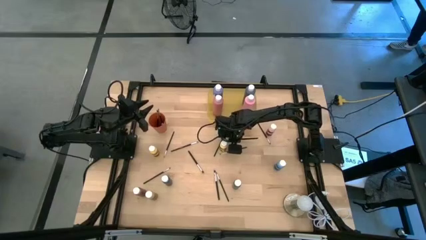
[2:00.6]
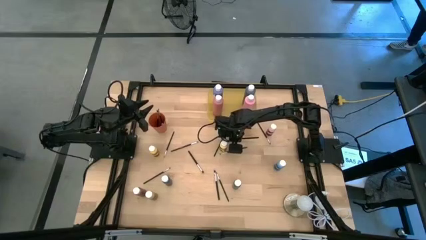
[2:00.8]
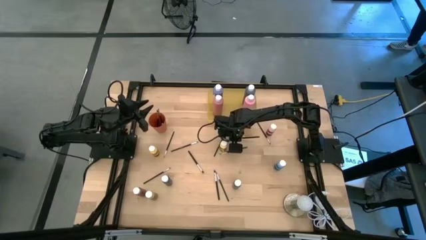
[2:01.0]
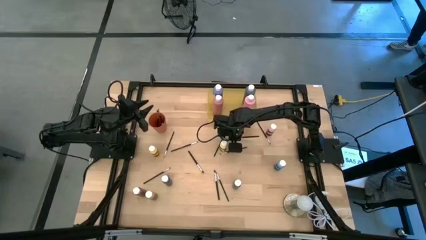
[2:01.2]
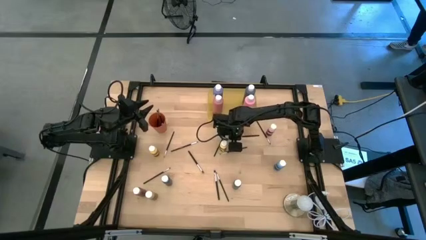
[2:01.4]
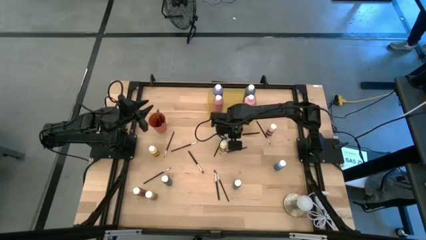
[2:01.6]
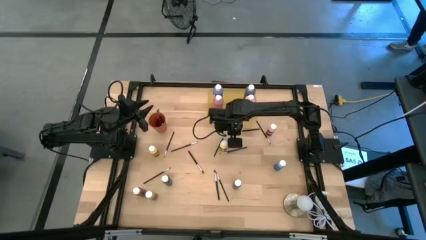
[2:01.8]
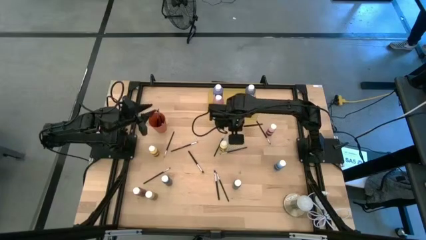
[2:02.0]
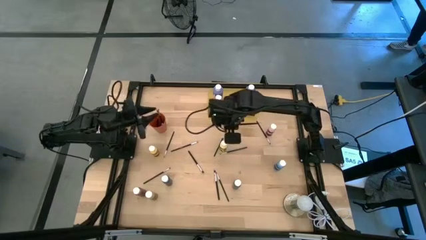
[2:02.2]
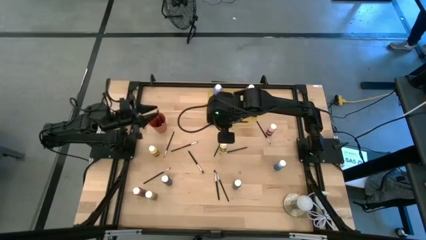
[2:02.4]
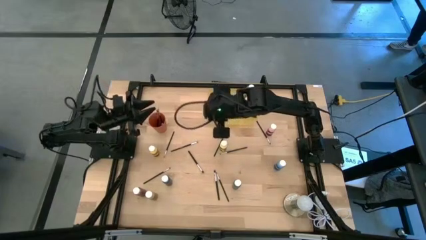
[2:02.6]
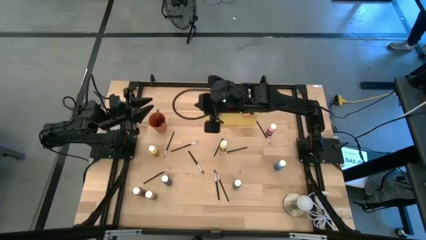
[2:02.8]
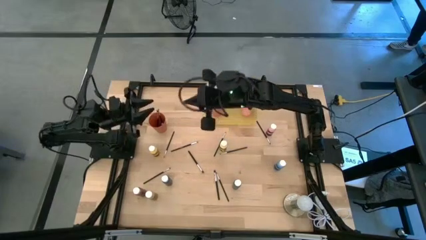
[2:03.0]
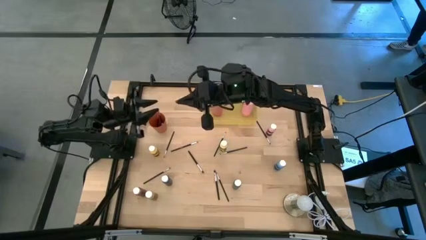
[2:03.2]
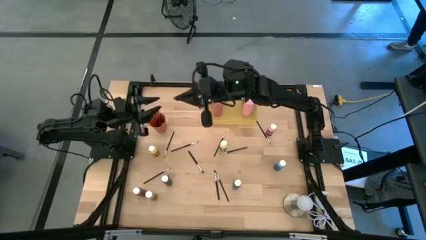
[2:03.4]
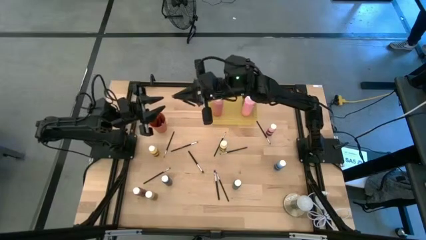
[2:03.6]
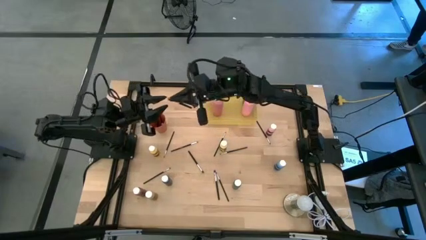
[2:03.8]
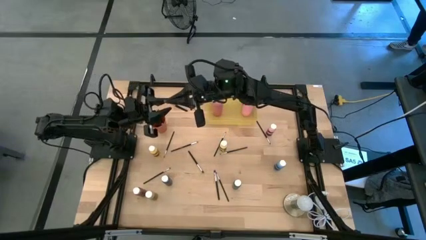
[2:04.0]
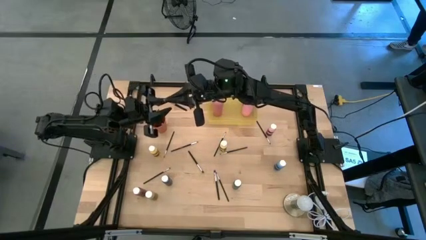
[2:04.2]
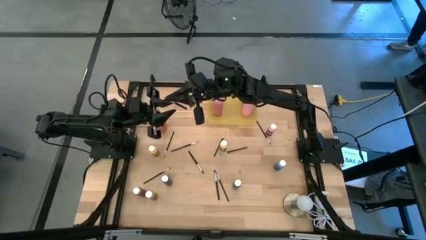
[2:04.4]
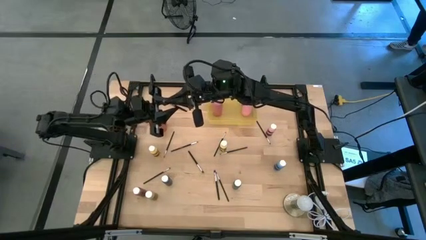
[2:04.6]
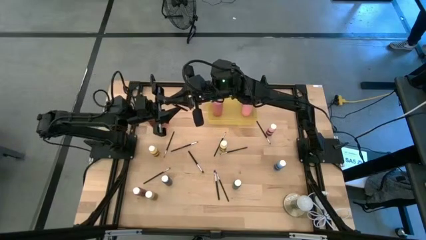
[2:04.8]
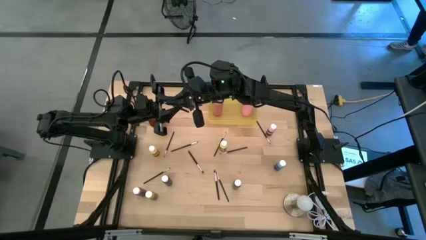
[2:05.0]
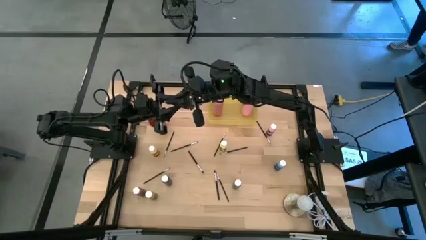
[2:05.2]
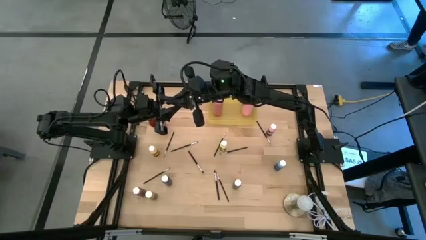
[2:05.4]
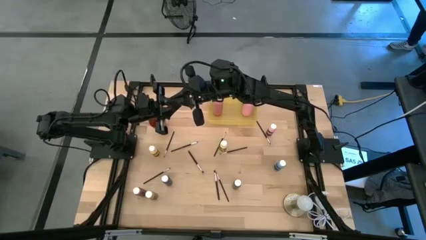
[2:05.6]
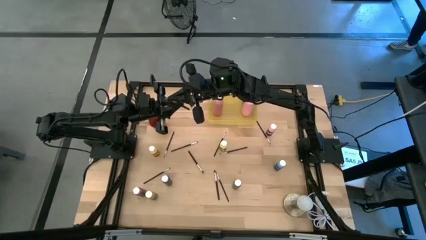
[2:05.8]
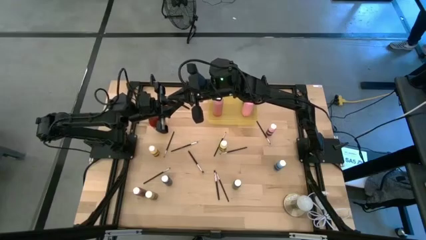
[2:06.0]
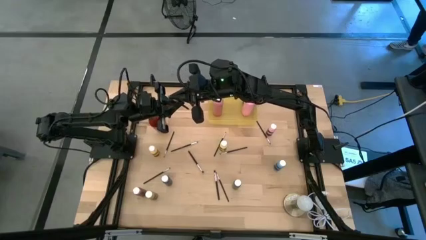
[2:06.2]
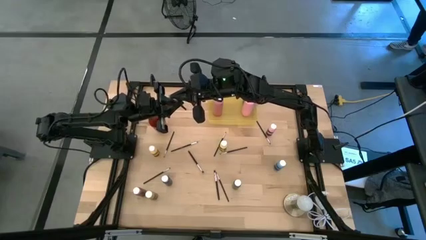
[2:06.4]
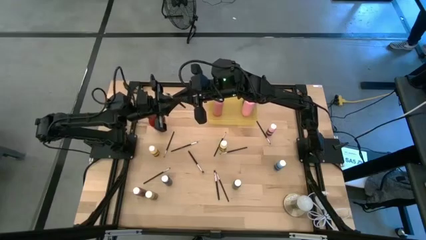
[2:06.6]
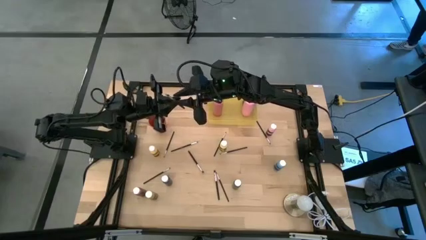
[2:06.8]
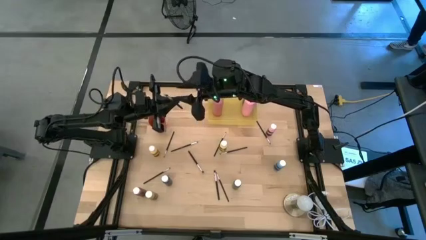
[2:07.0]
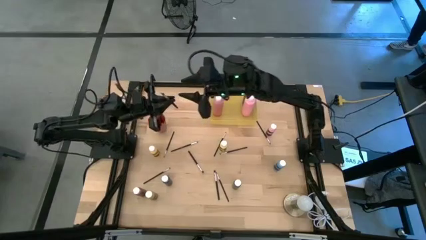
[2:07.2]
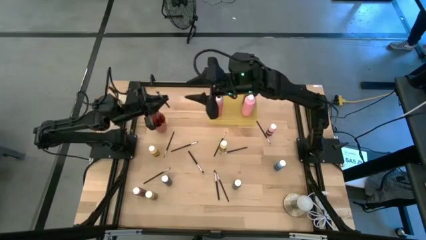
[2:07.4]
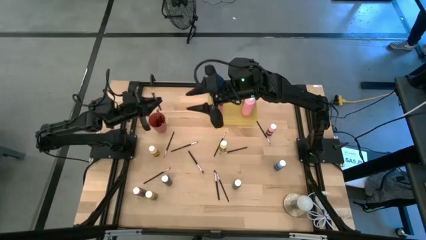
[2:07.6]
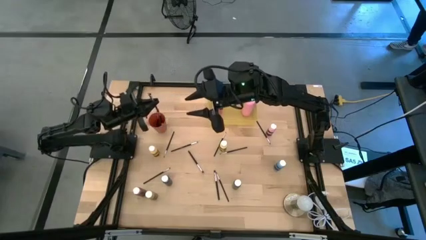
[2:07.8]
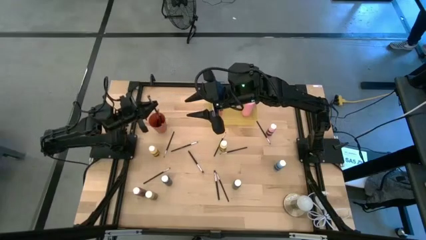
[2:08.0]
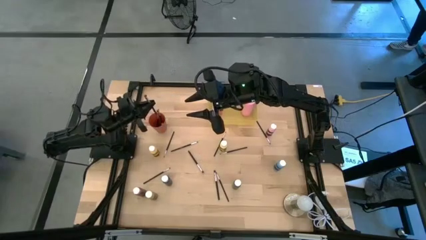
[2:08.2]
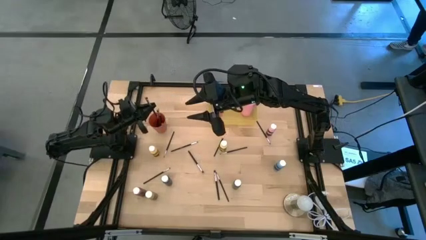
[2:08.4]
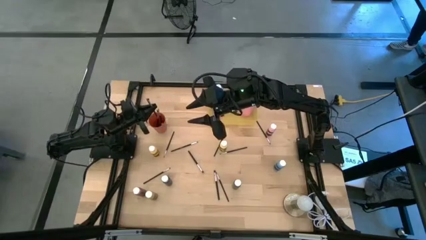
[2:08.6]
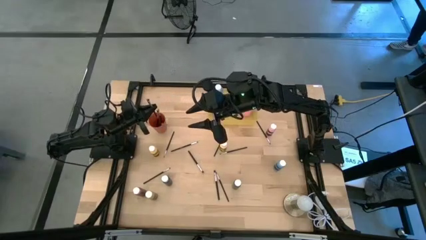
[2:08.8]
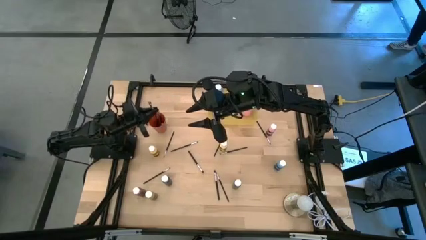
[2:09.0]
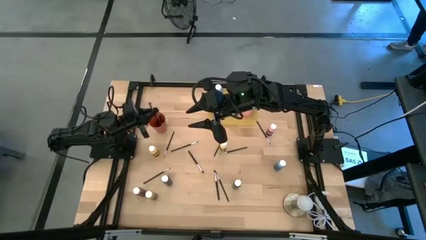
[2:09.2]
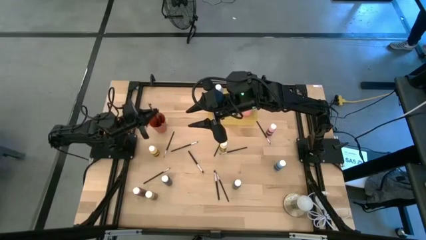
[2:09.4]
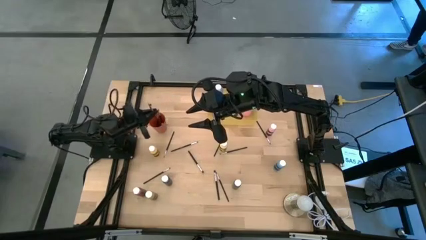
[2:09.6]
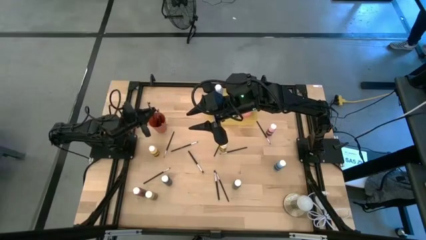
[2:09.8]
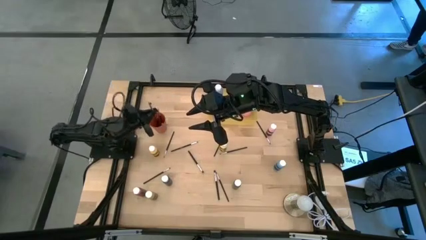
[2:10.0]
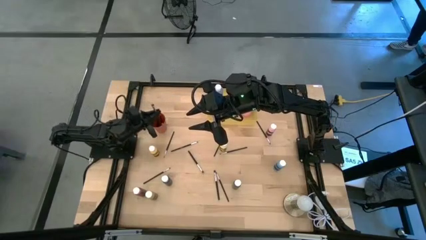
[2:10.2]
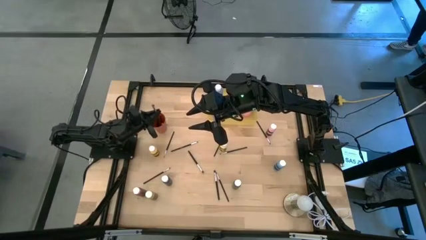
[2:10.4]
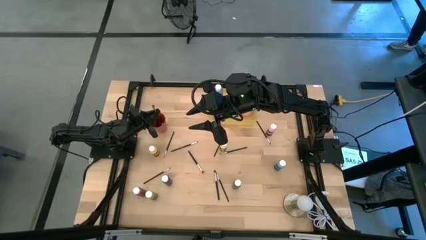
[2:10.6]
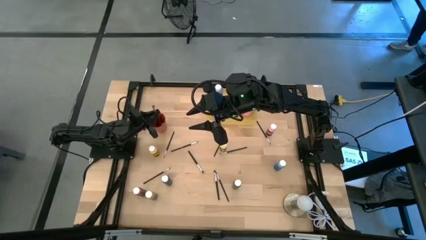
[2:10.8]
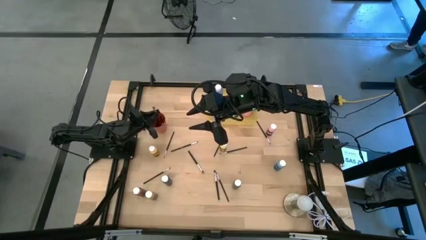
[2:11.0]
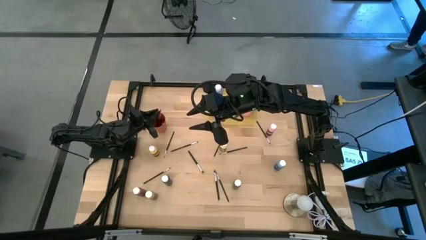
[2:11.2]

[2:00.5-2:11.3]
Task: Pick & Place Paint Supplies
Put the silver paint brush into the orange cup

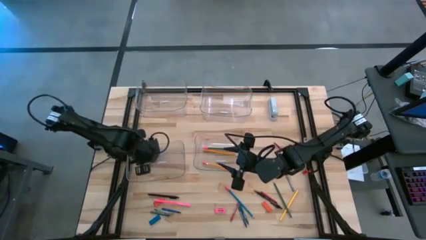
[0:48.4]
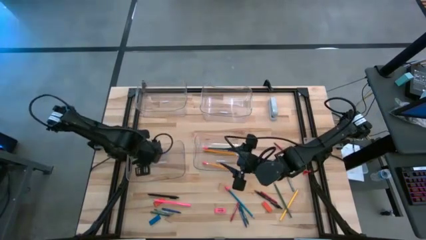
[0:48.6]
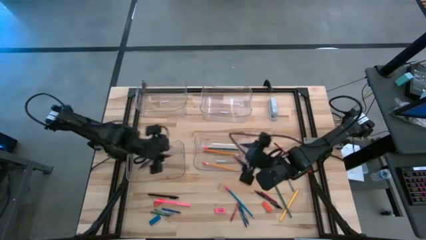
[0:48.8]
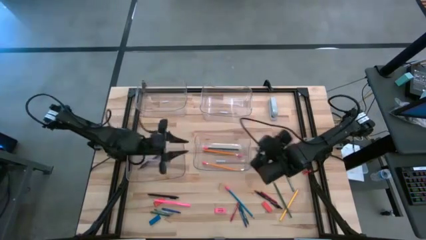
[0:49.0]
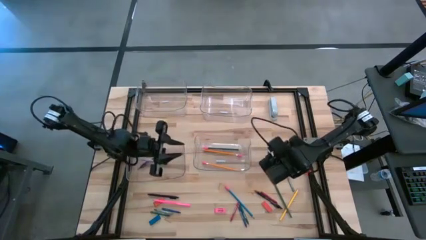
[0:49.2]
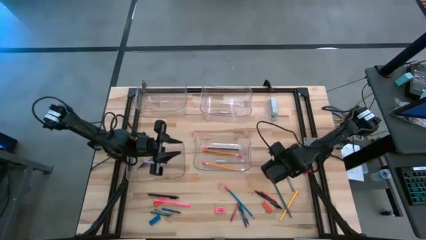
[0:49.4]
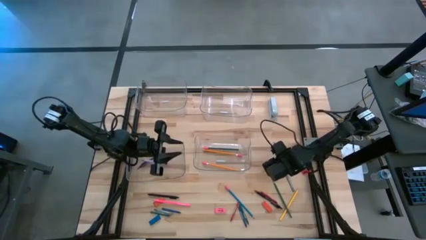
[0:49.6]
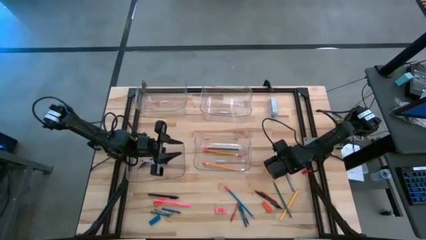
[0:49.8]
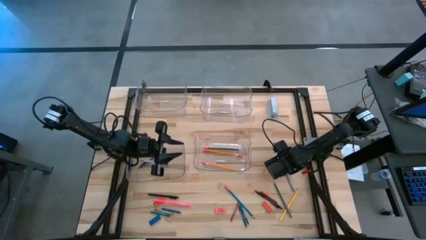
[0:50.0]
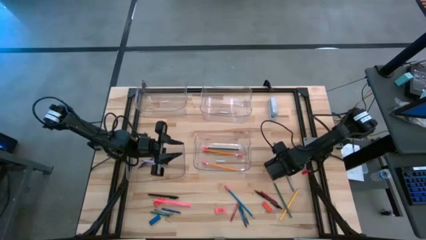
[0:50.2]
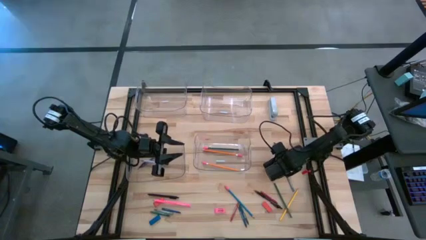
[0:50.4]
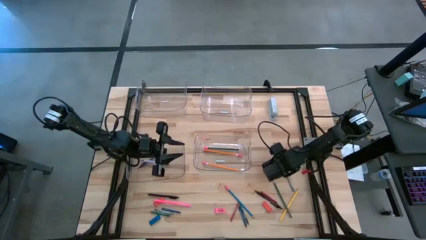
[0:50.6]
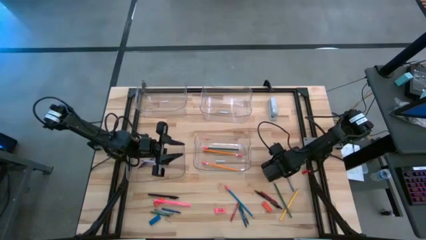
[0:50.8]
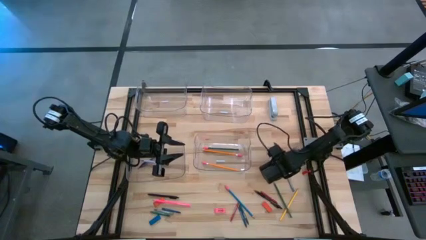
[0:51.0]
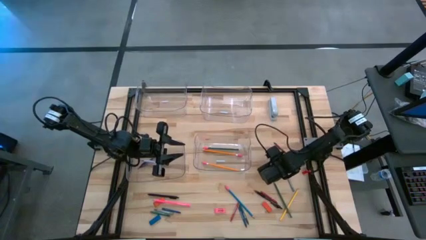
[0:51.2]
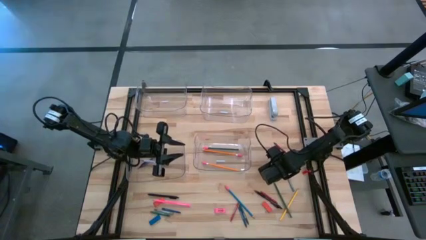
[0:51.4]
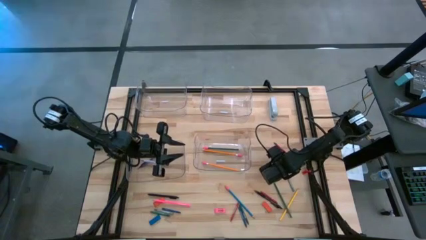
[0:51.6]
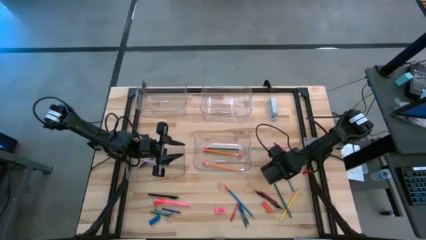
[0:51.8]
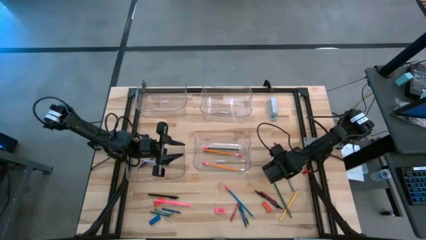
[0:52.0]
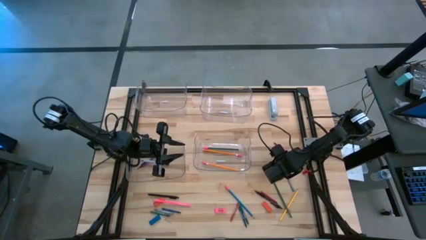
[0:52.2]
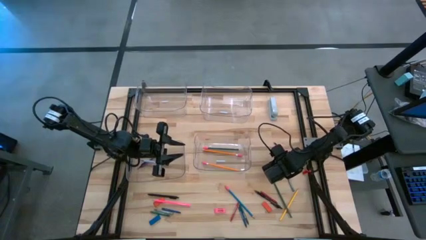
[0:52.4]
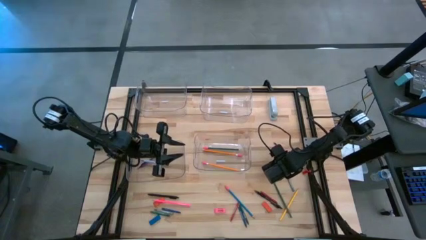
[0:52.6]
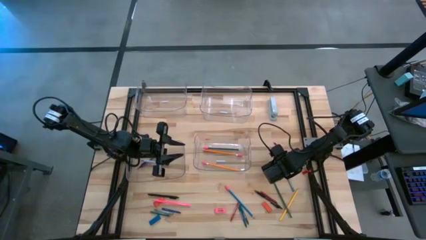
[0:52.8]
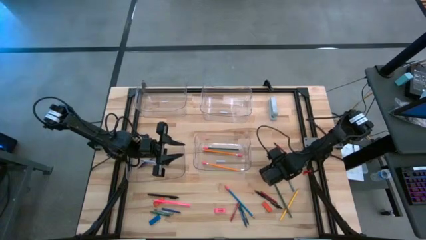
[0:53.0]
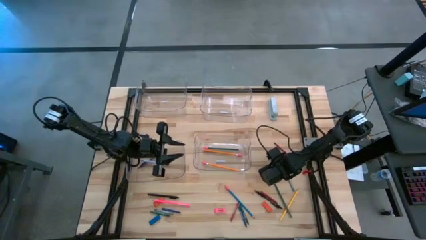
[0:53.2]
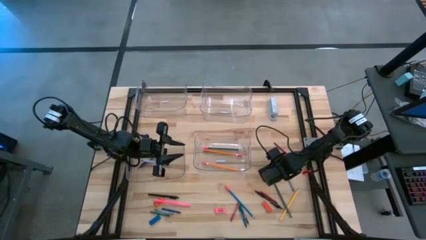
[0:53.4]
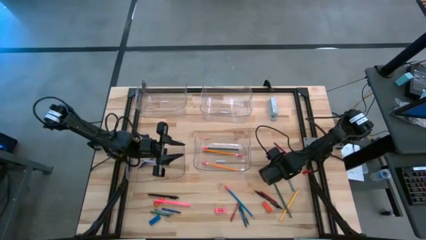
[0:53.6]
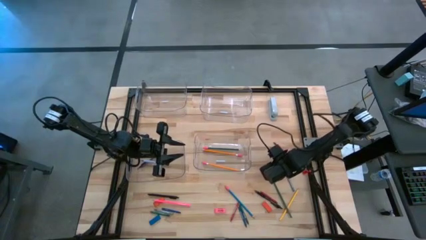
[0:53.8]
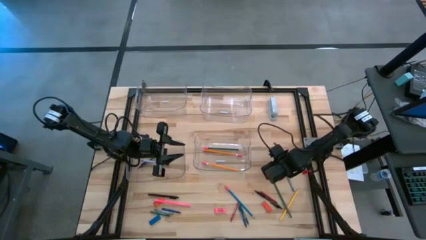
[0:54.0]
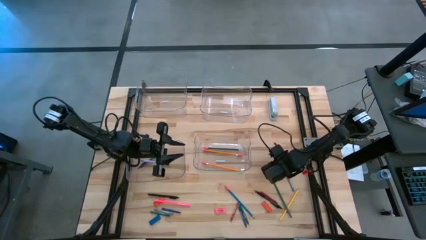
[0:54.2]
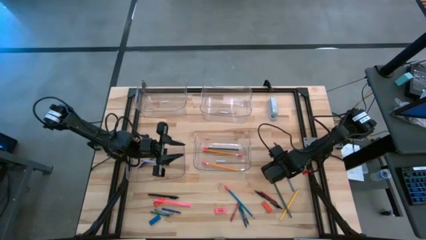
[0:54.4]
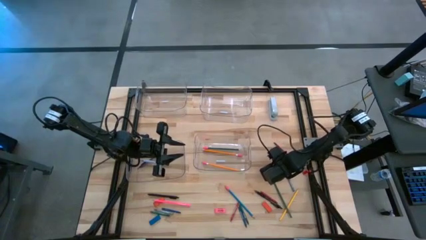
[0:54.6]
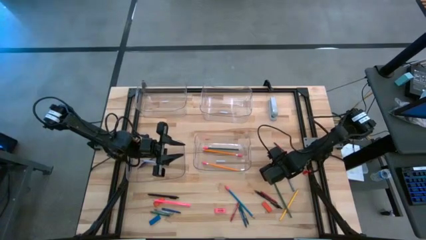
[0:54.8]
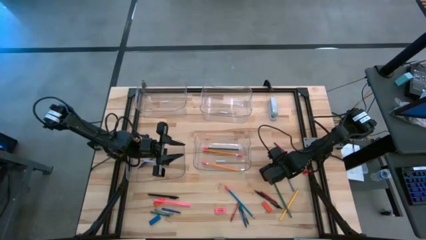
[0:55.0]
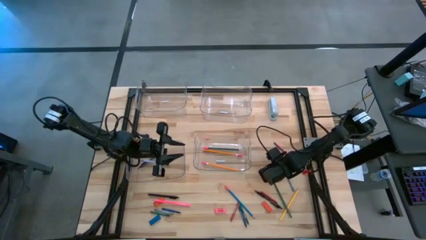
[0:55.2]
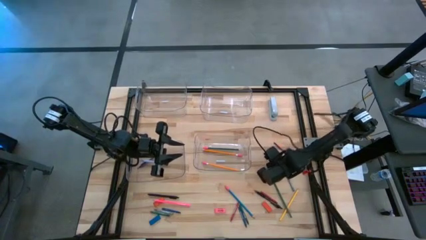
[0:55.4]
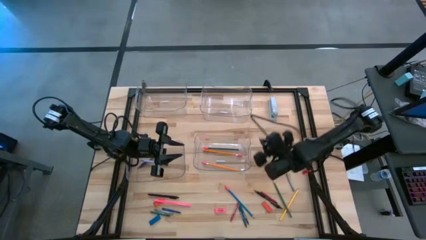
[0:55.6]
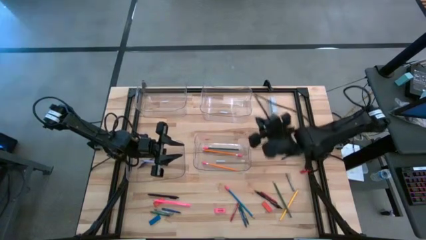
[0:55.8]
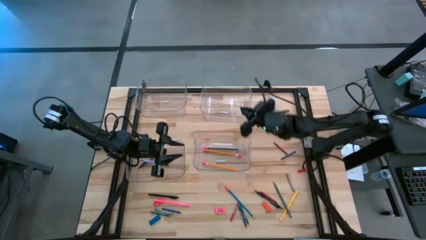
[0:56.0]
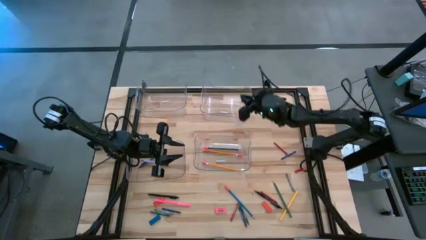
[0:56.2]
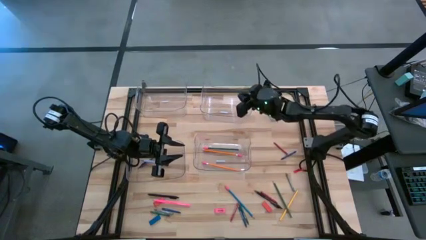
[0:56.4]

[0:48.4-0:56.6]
Task: Sort crayons/erasers/pens/pencils in bins
Put the top blue eraser into the top right transparent bin
